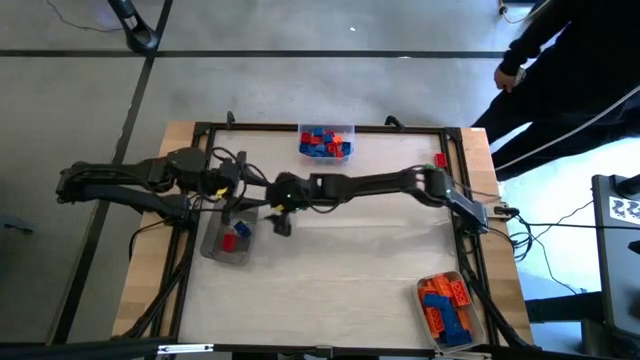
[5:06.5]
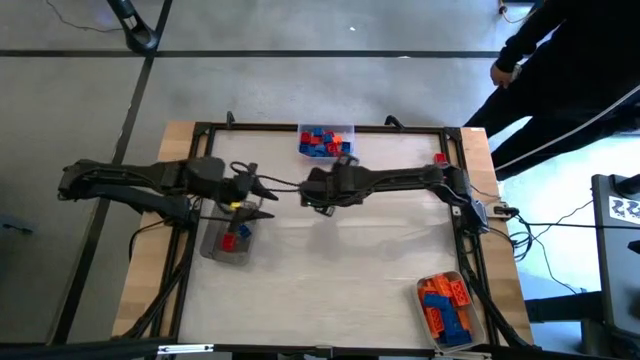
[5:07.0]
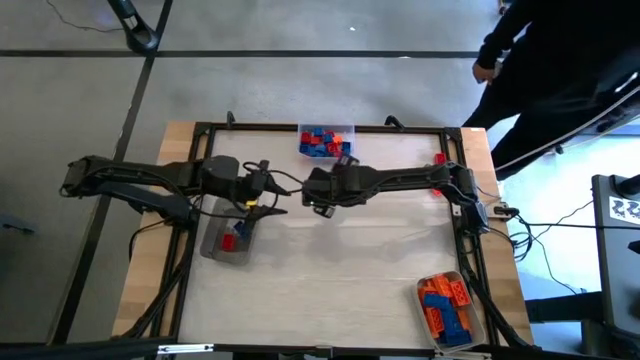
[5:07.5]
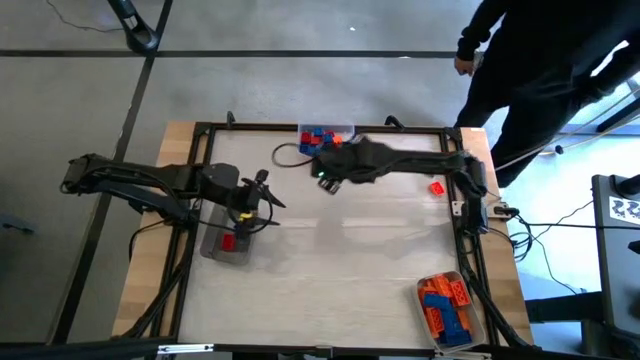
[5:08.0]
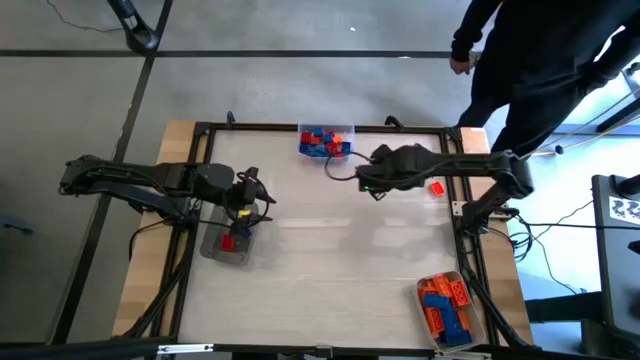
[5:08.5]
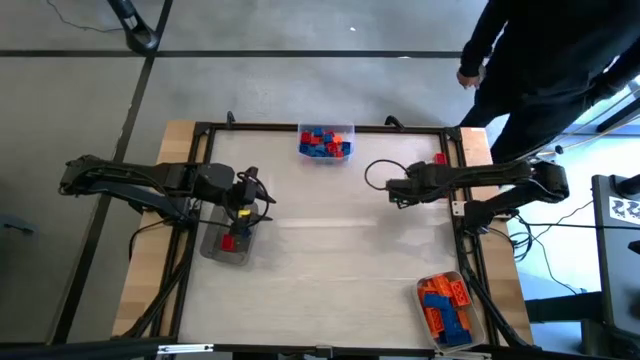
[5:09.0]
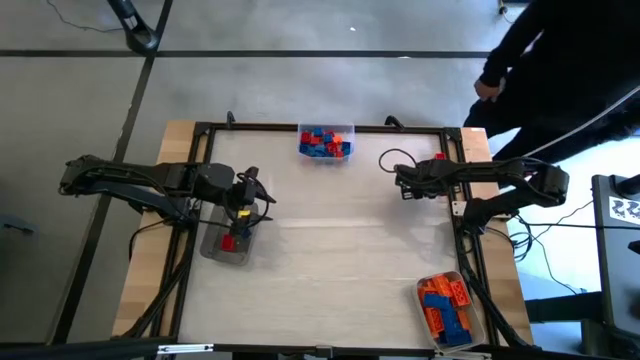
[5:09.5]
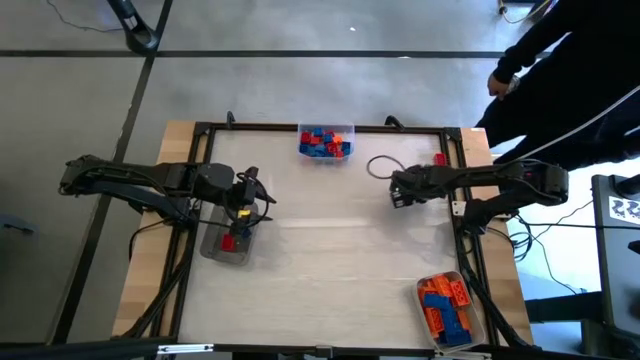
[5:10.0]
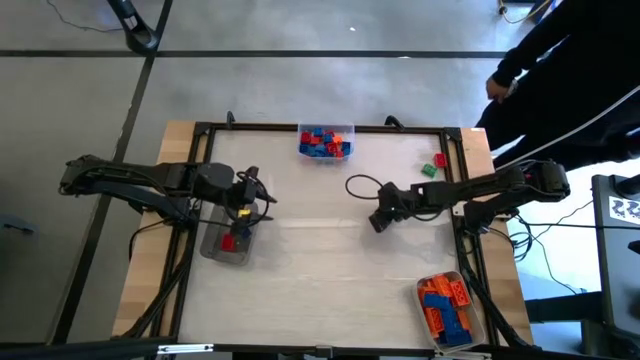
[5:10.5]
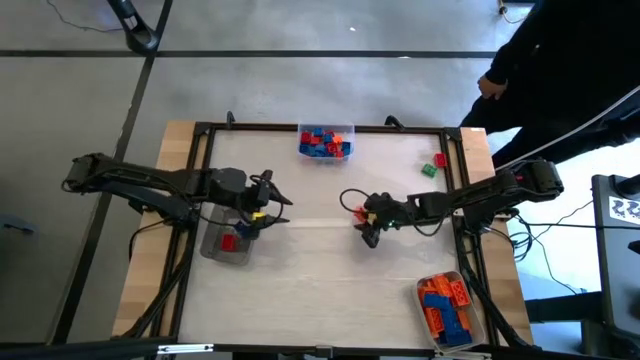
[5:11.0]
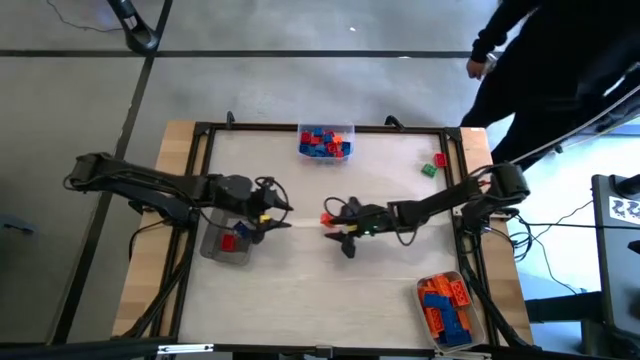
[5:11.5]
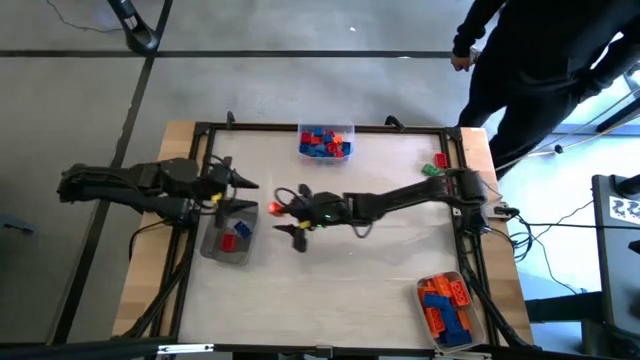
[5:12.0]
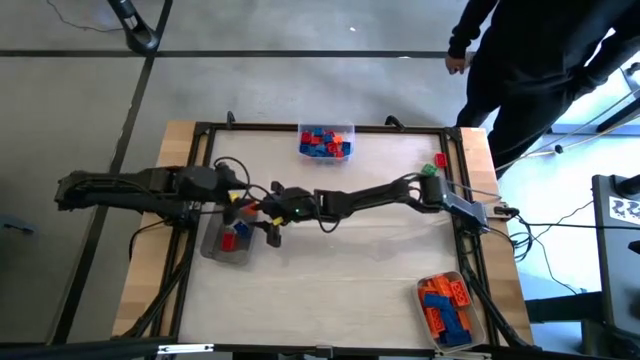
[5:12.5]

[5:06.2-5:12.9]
Task: Sort blocks by size
Put the orange 4 stud game piece into the black bin

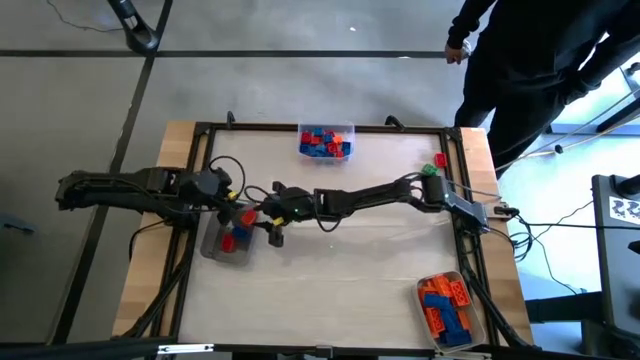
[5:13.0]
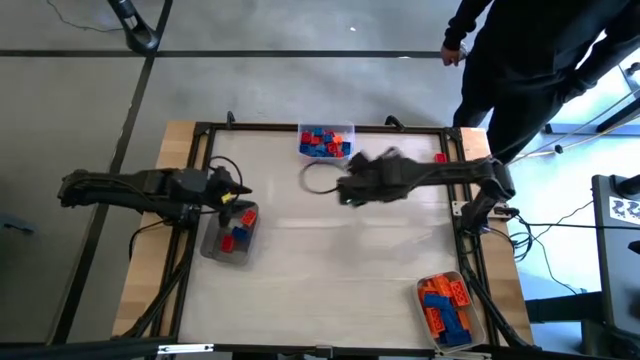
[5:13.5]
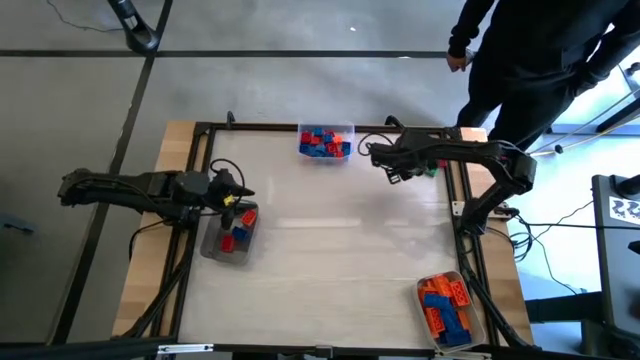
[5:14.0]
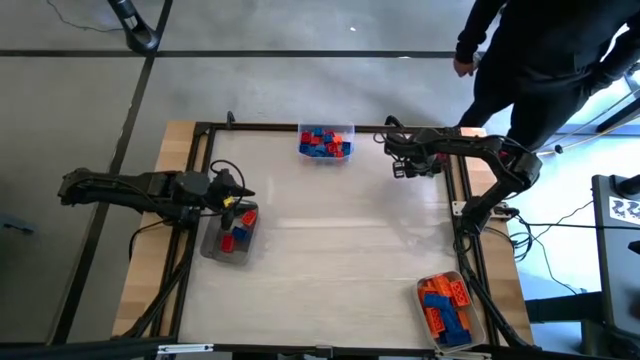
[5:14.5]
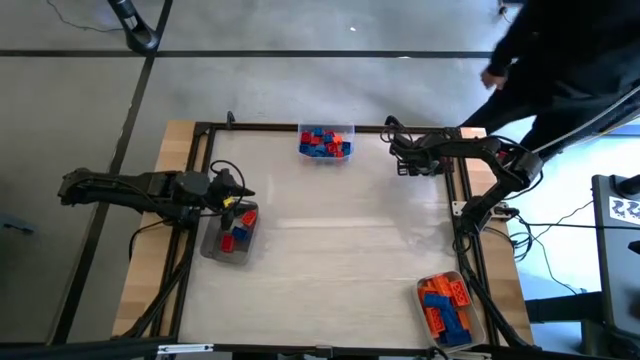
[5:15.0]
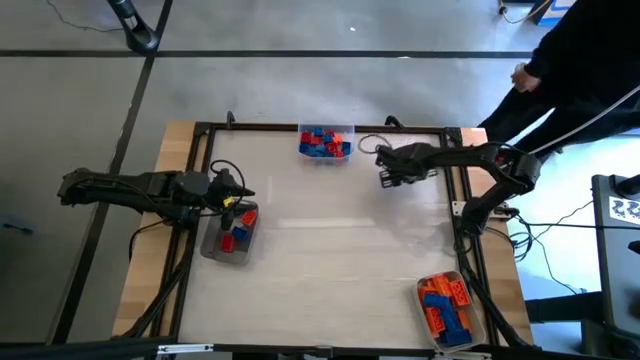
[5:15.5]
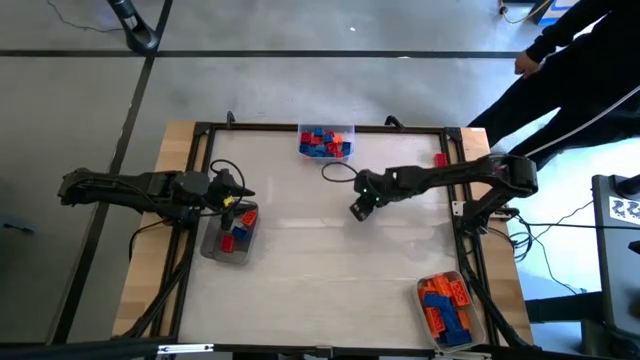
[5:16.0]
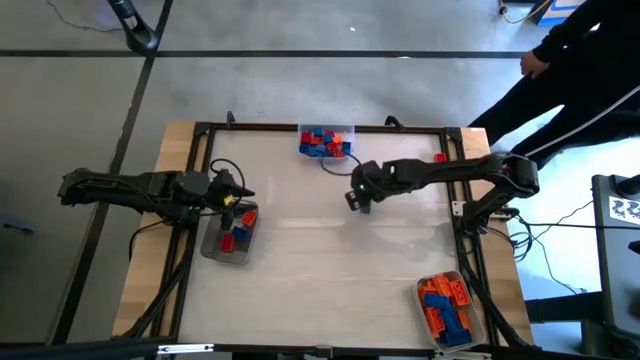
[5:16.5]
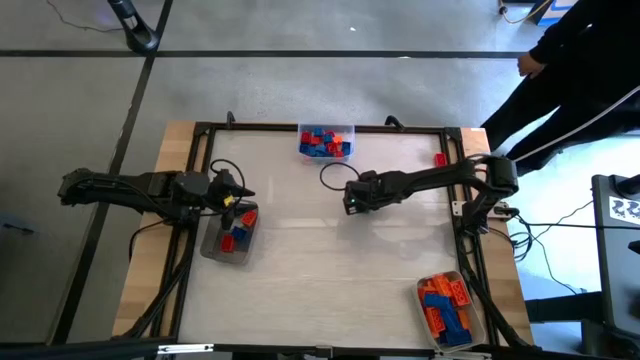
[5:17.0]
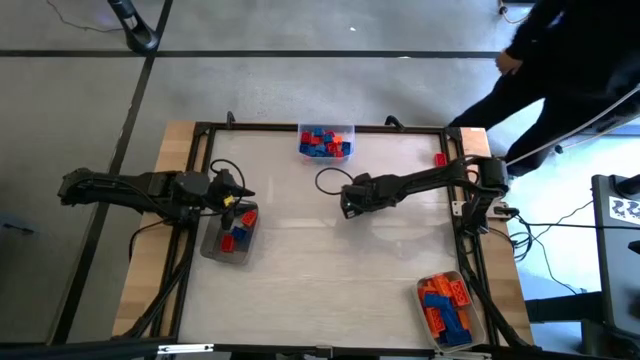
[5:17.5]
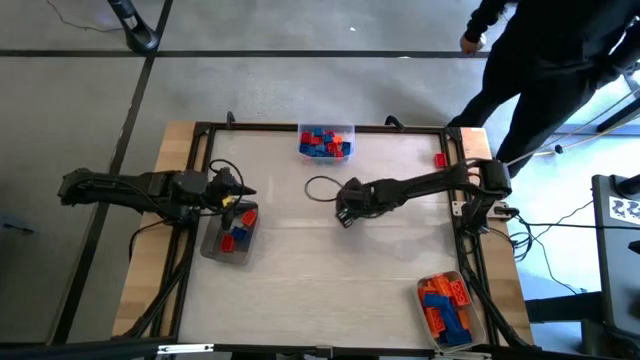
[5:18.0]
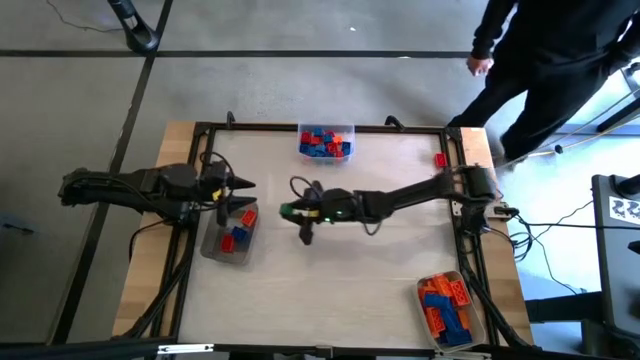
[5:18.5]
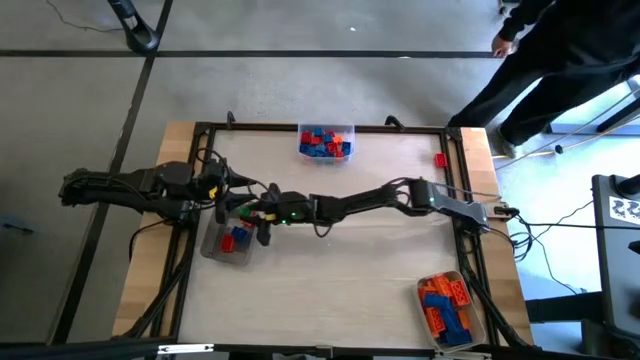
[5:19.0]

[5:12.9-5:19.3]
Put the green 4 stud game piece into the black bin

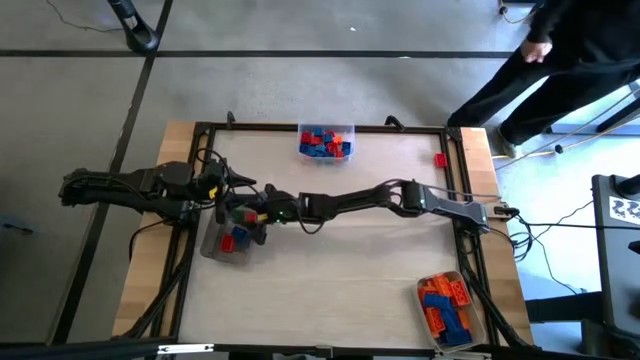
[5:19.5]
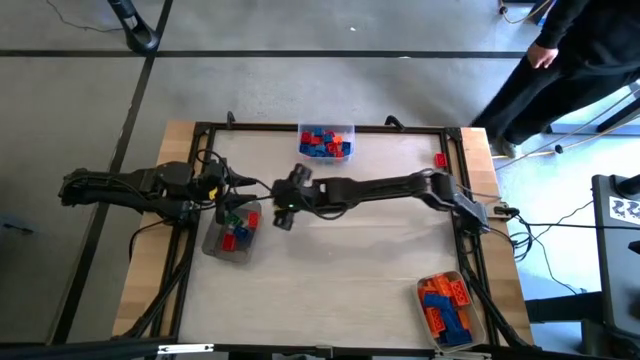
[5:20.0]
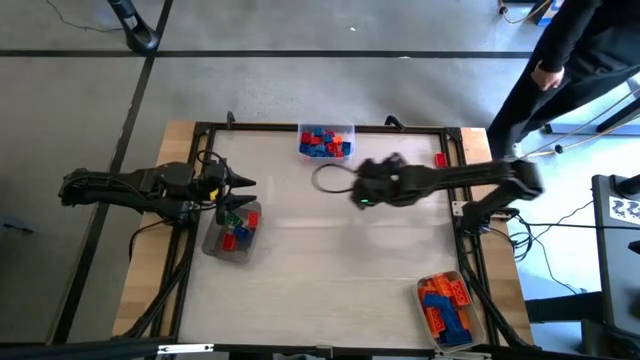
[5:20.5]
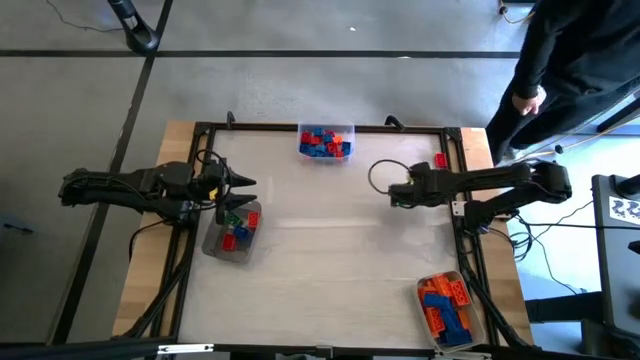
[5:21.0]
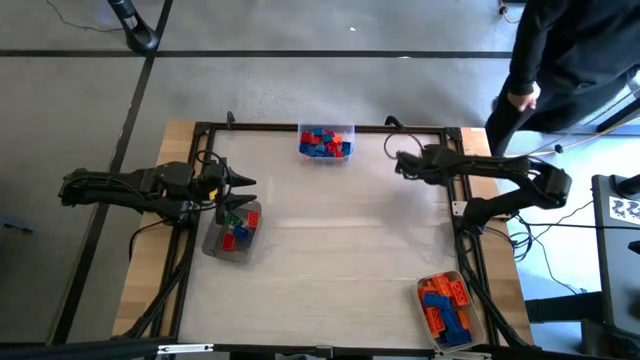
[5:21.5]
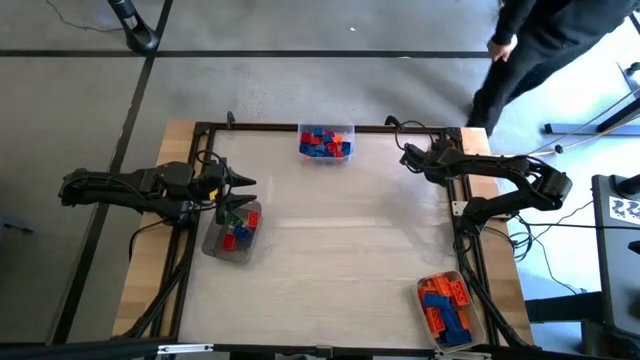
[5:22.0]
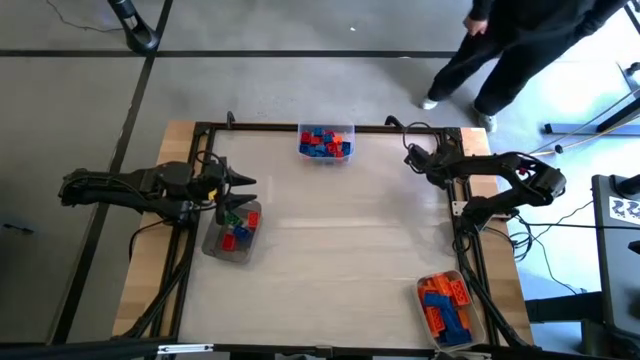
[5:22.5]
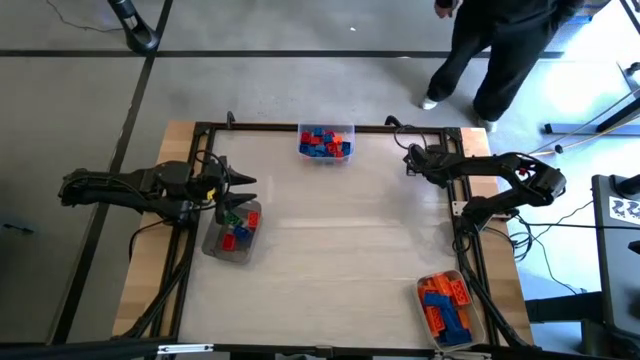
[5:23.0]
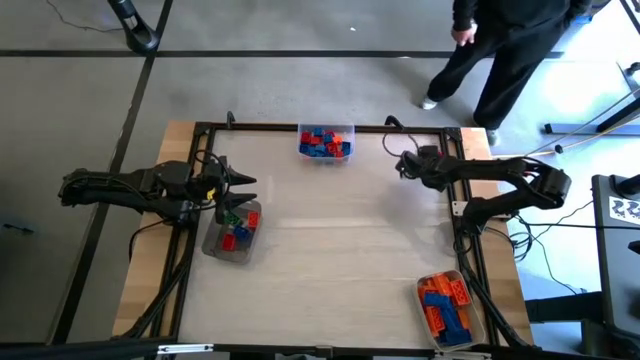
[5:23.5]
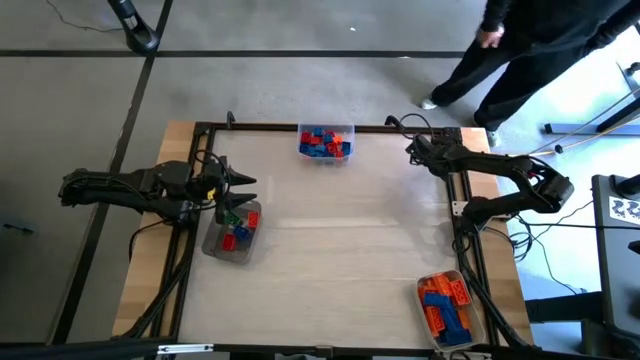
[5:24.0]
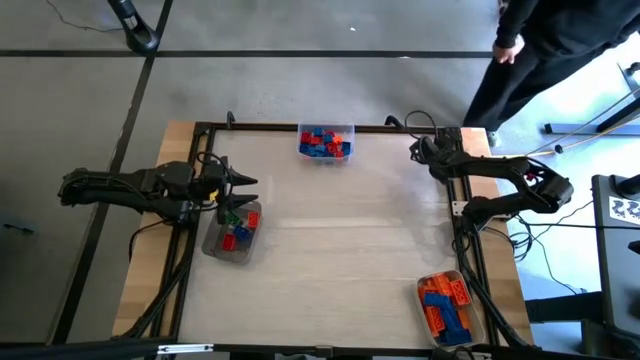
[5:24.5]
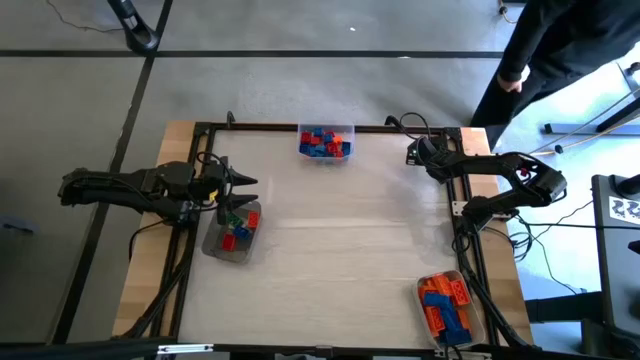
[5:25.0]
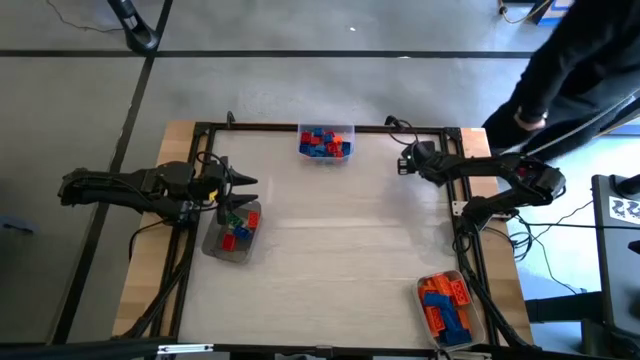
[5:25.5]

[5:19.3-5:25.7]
Put the red 4 stud game piece into the black bin

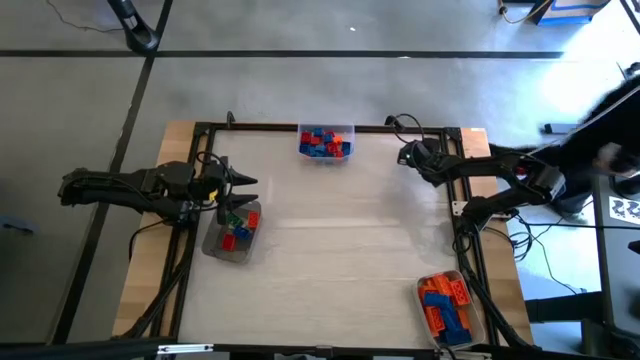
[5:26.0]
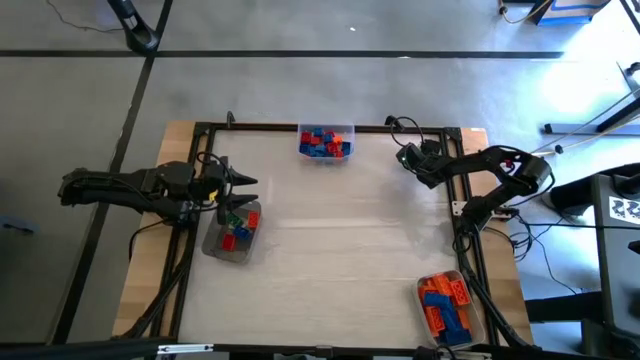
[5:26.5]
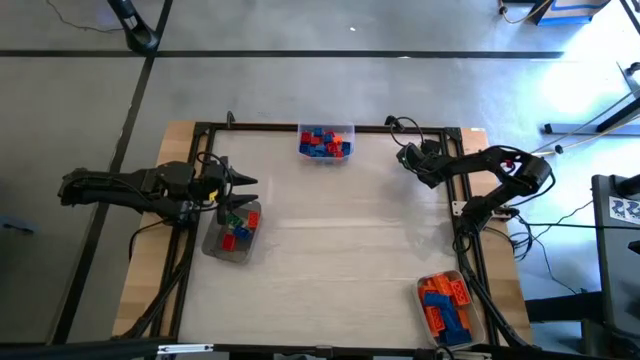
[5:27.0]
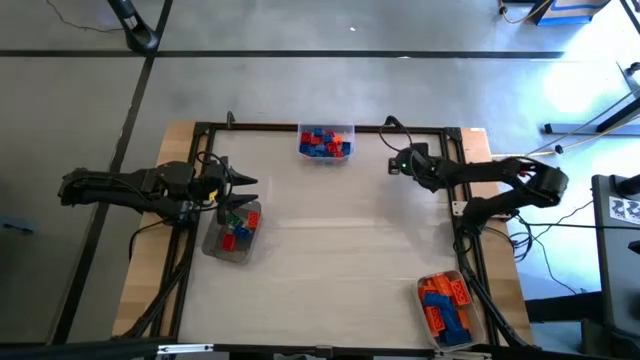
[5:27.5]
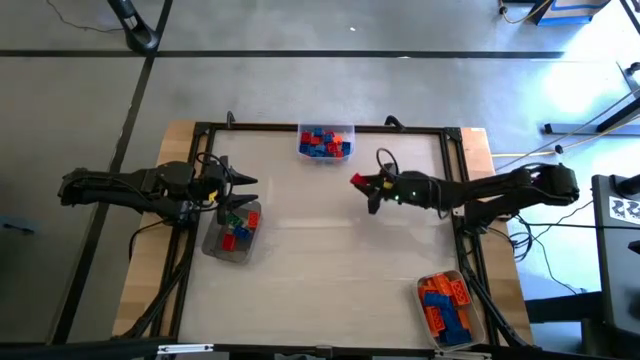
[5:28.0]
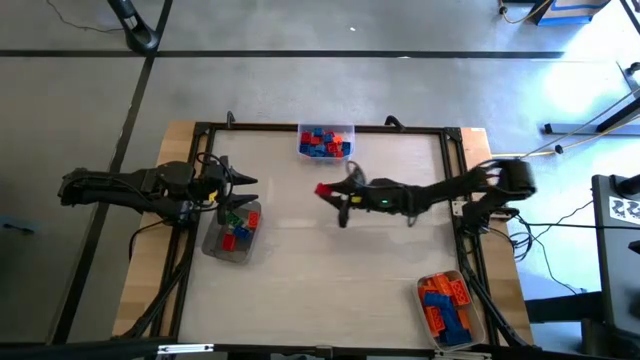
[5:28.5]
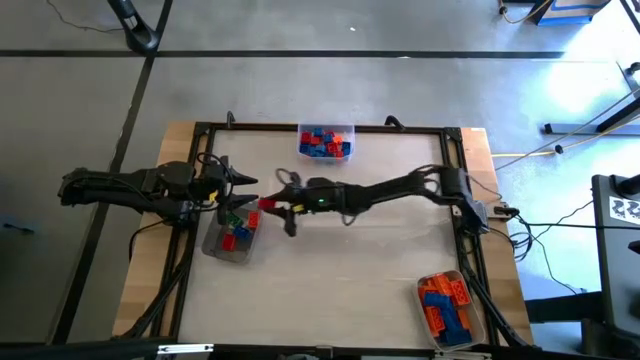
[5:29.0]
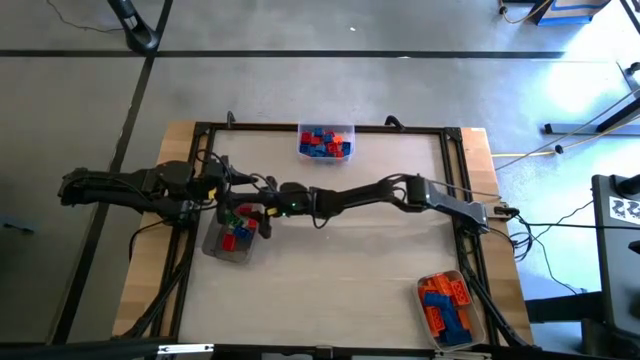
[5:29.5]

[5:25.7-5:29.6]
Put the red 4 stud game piece into the black bin
